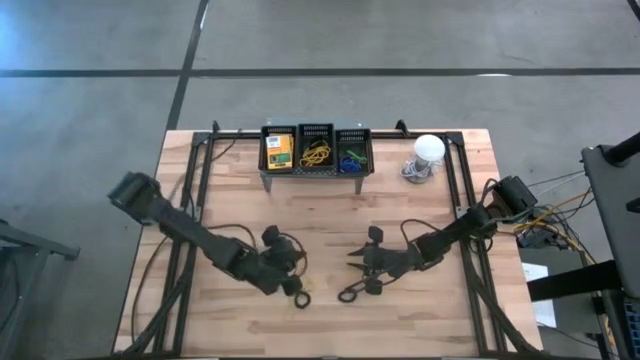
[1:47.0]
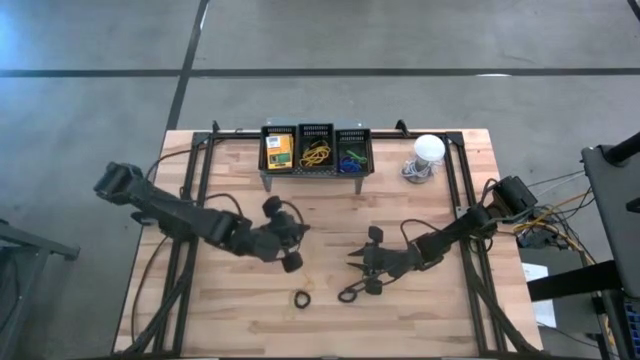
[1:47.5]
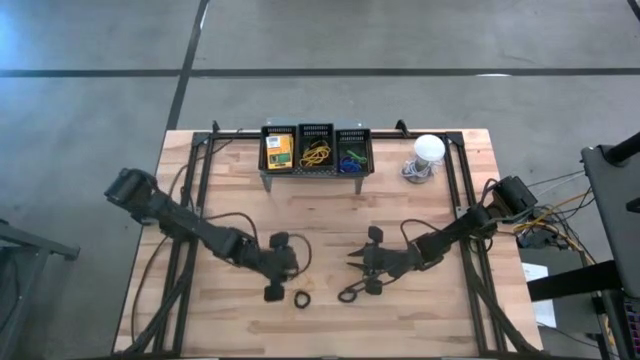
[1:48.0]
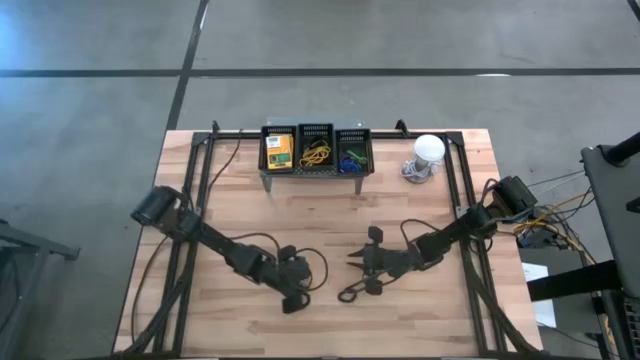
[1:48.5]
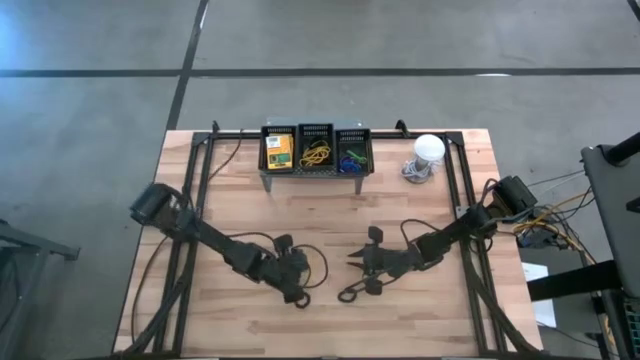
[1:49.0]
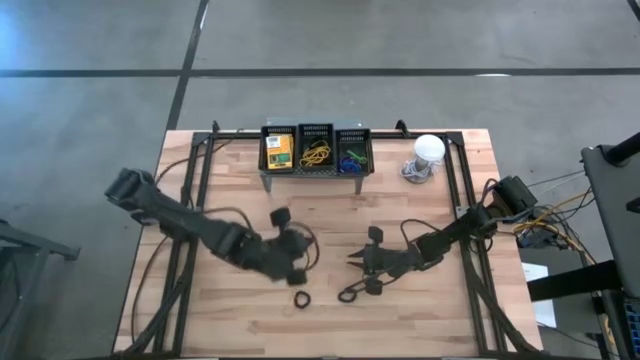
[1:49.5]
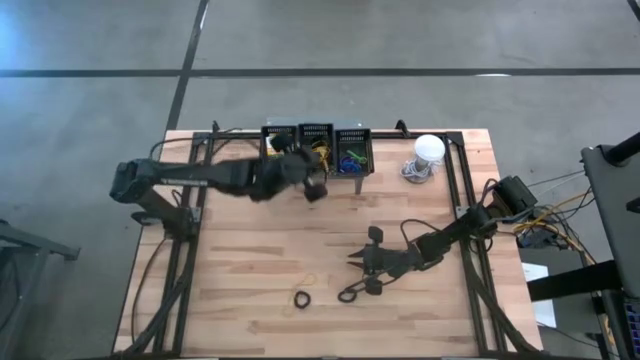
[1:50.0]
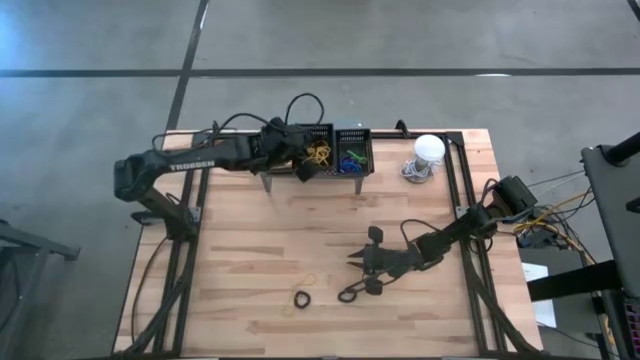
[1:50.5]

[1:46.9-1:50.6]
Task: Pick & Place Office Desk Supplies
Put the yellow rubber band into the middle black basket

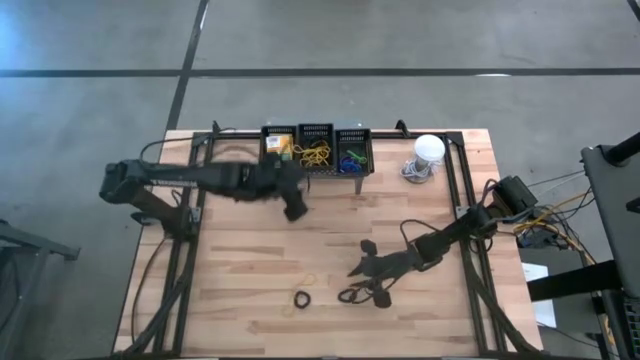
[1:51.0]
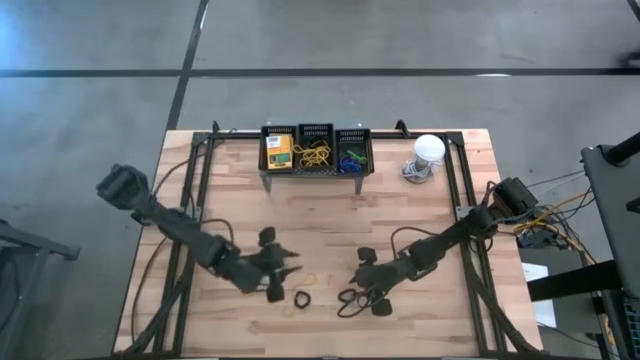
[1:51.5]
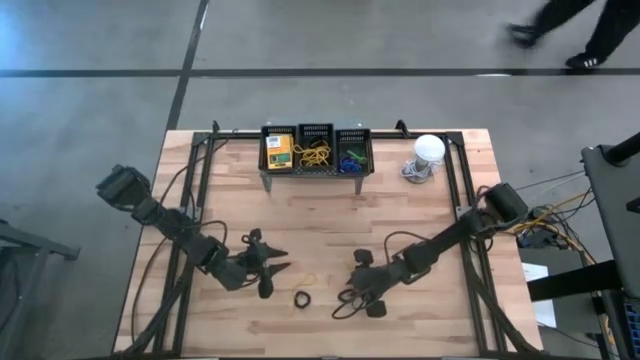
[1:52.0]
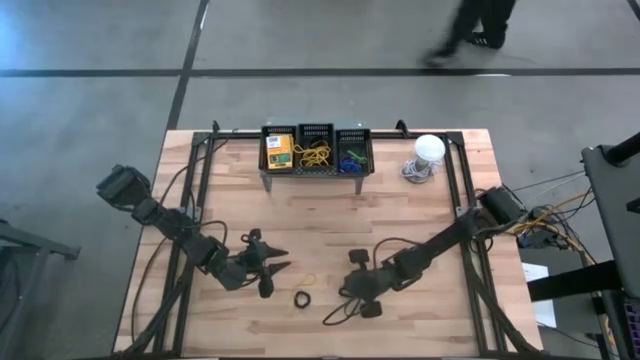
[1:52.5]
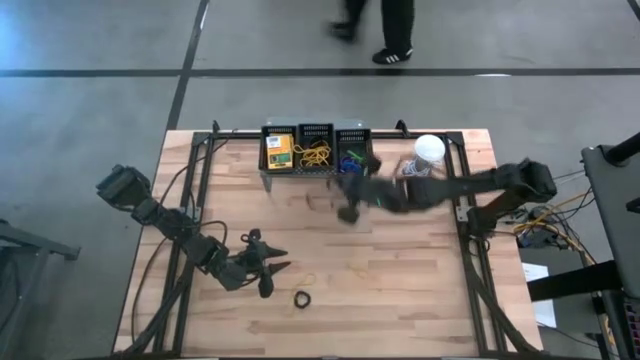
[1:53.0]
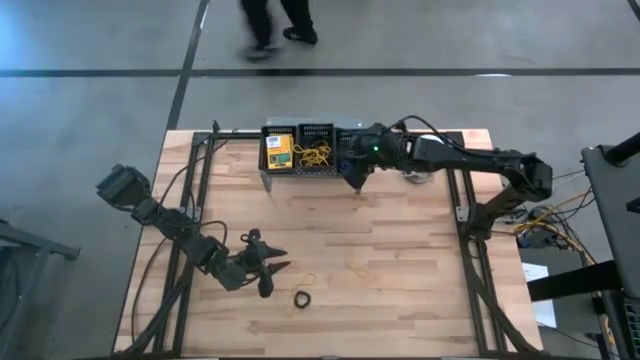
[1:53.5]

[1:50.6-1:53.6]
Put the black spring keychain into the right black basket

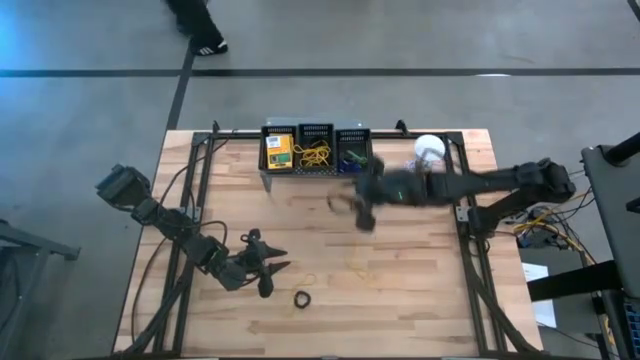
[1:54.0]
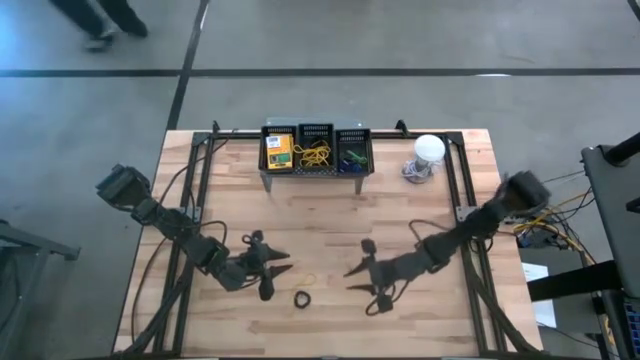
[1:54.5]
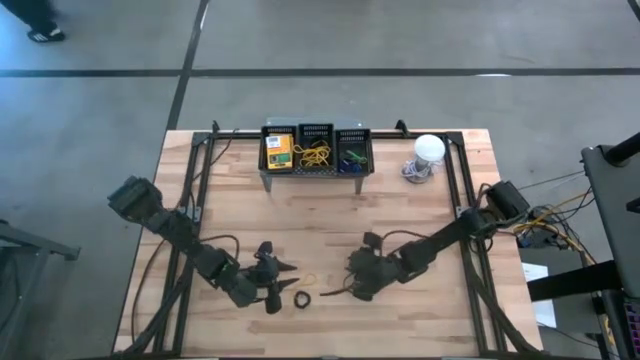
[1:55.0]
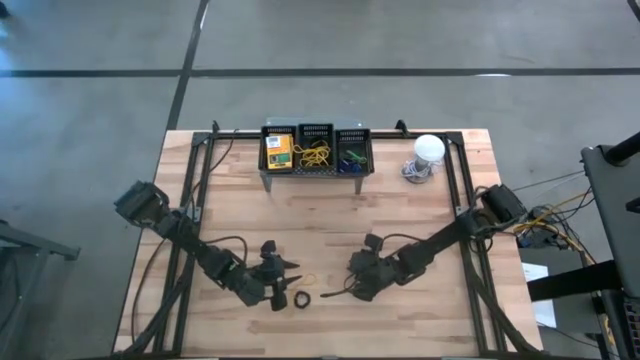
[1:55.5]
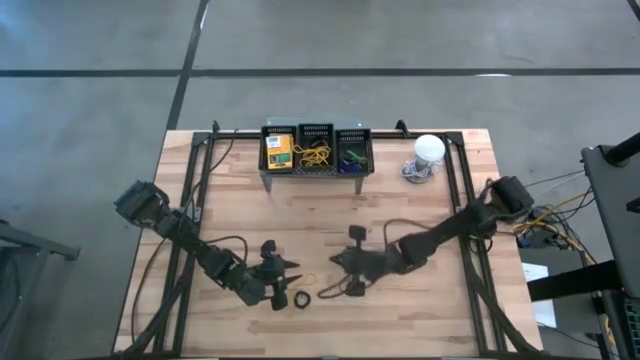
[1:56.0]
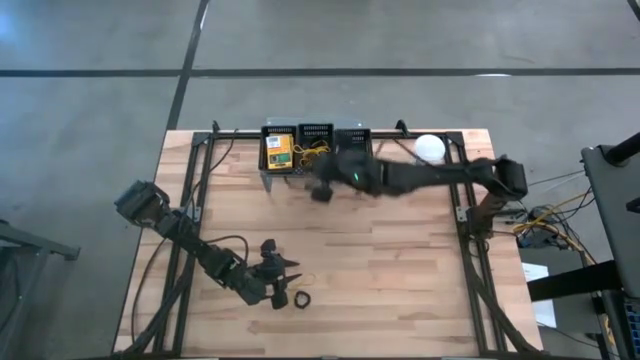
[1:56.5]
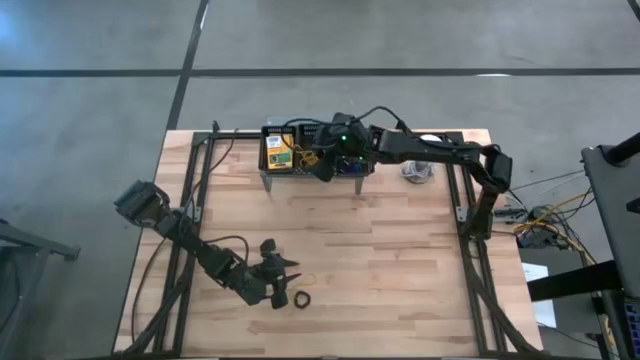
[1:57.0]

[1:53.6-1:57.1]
Put the yellow rubber band into the middle black basket

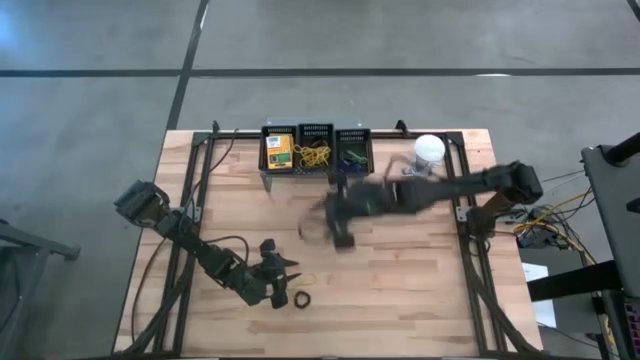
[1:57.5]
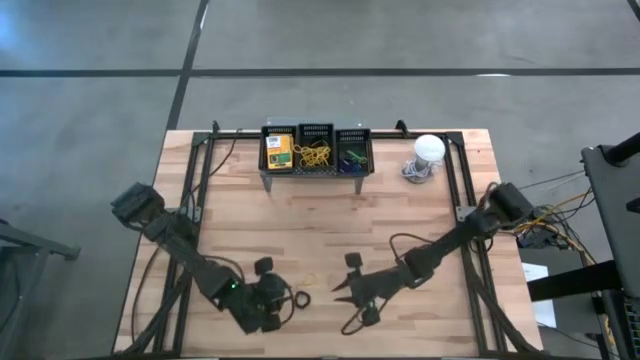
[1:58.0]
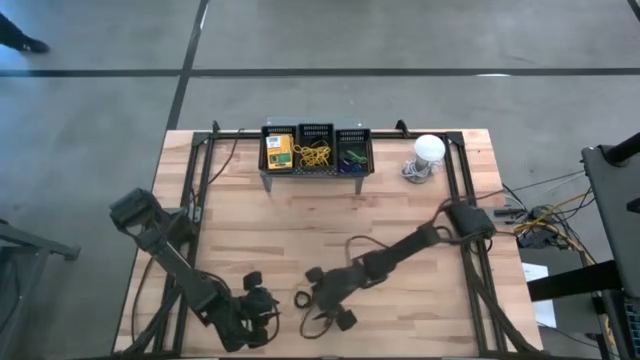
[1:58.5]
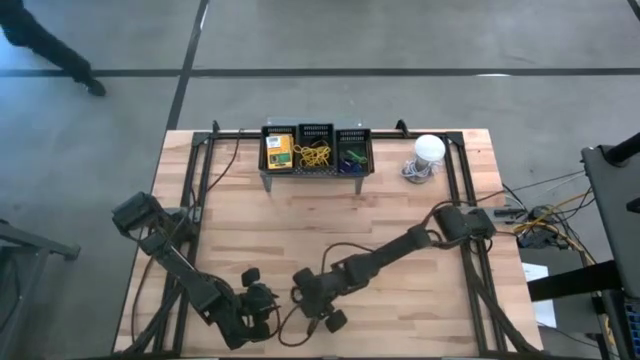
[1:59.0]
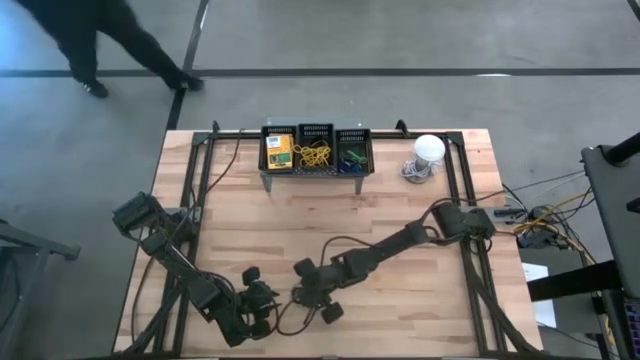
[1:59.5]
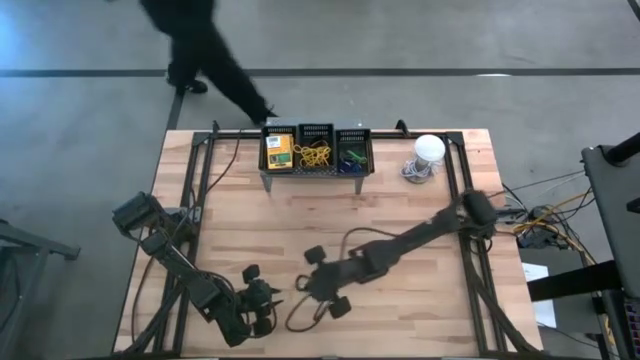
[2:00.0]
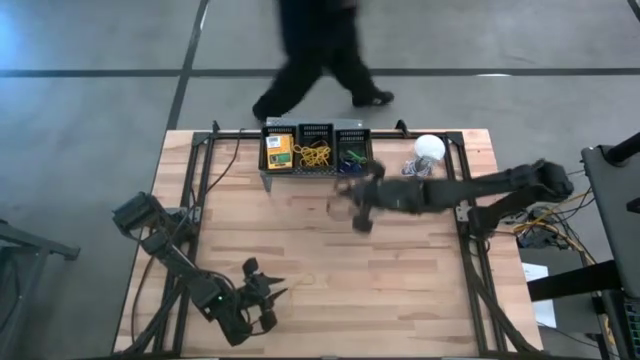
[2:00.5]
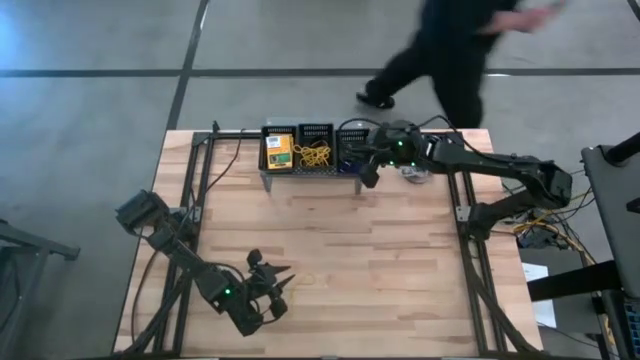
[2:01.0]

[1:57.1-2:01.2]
Put the black spring keychain into the right black basket

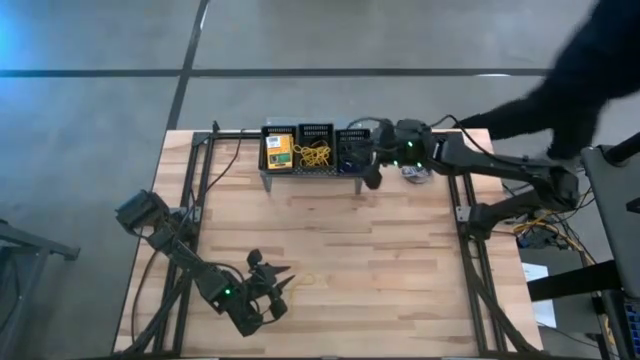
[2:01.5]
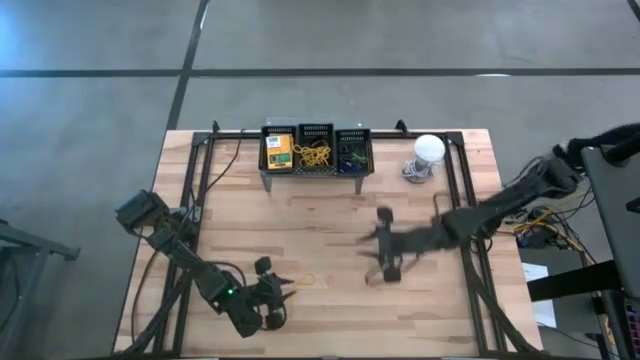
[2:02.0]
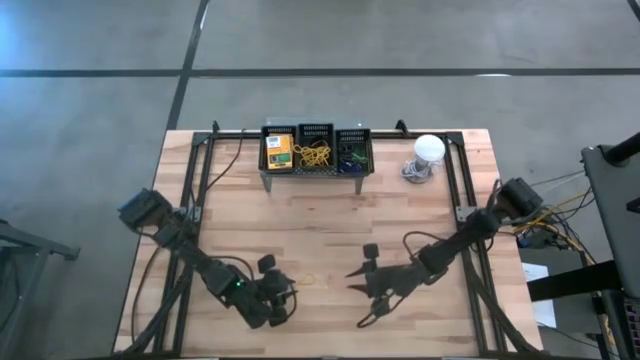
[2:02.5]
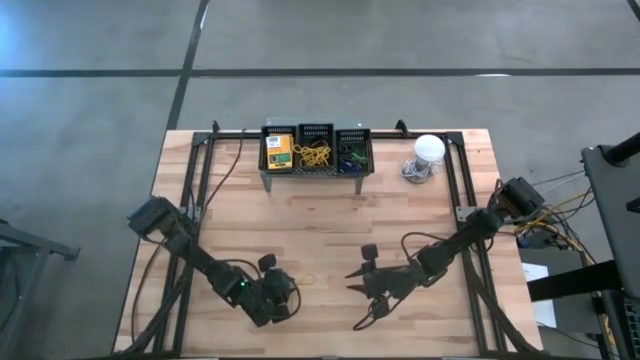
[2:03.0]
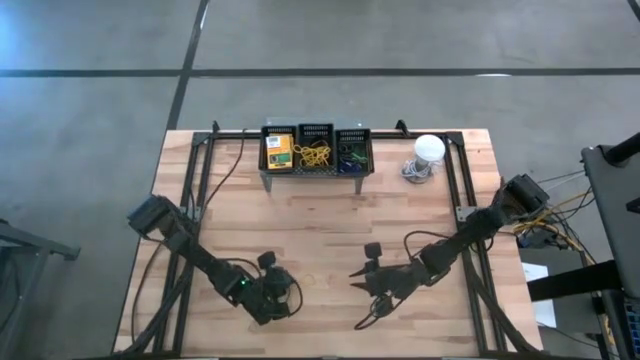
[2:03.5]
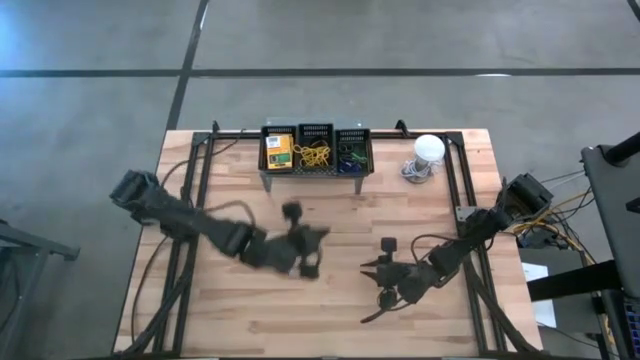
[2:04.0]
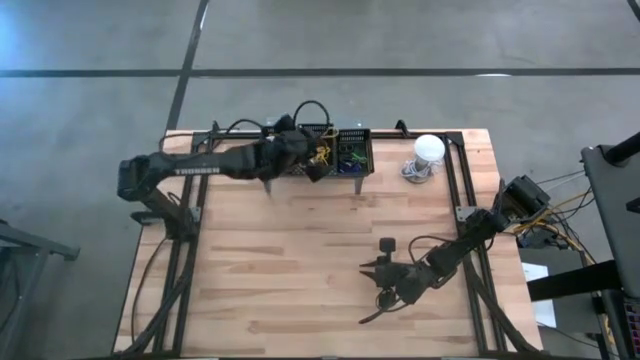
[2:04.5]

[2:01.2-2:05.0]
Put the yellow rubber band into the middle black basket

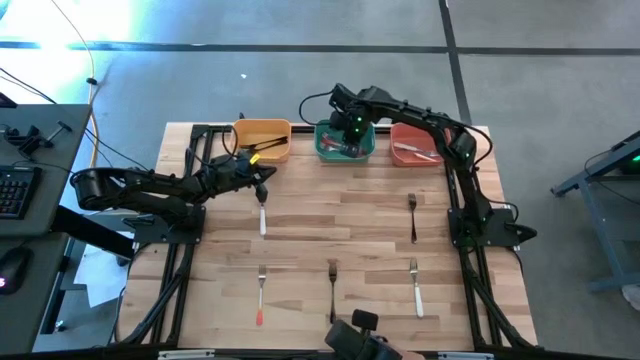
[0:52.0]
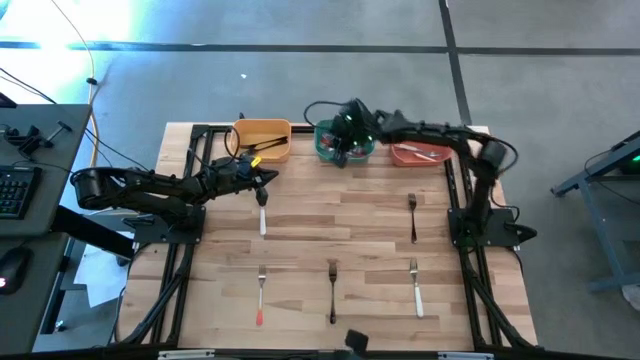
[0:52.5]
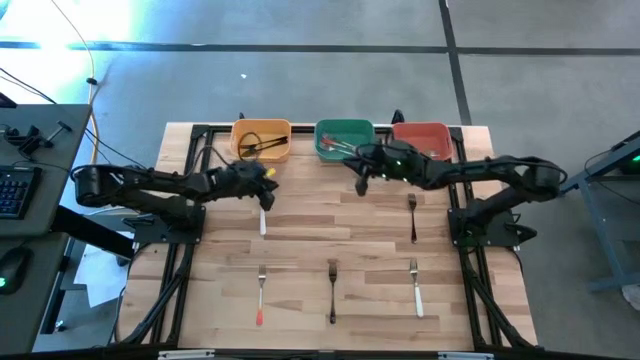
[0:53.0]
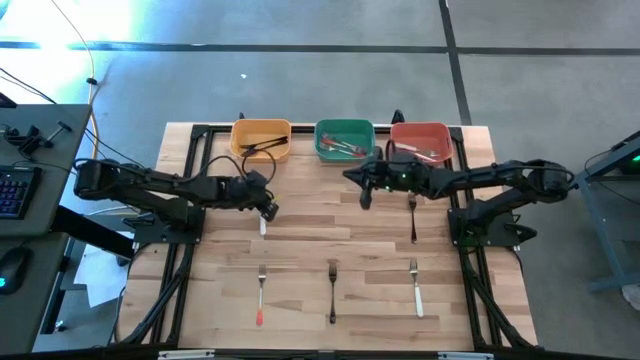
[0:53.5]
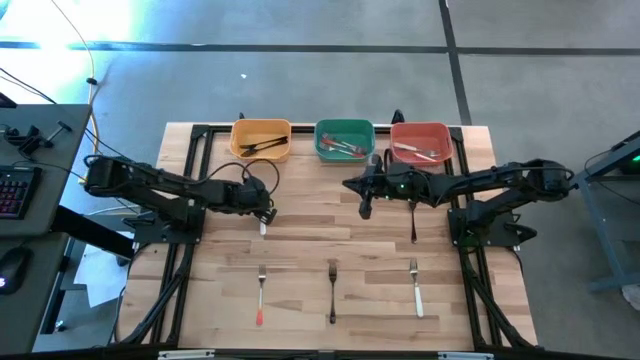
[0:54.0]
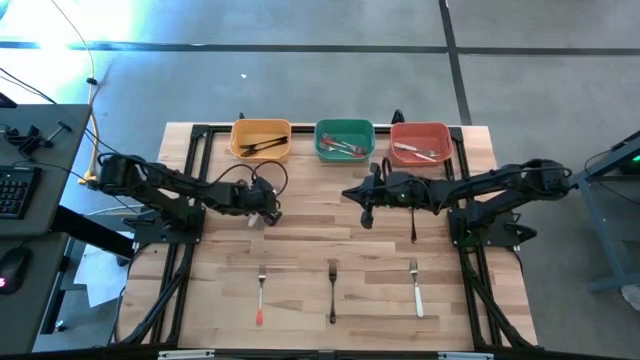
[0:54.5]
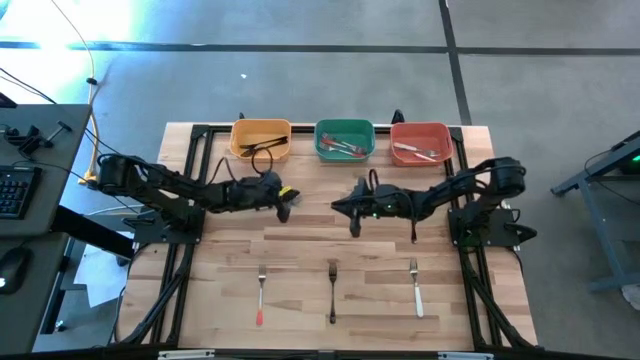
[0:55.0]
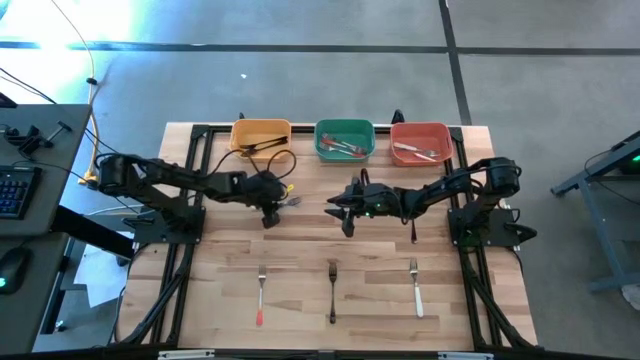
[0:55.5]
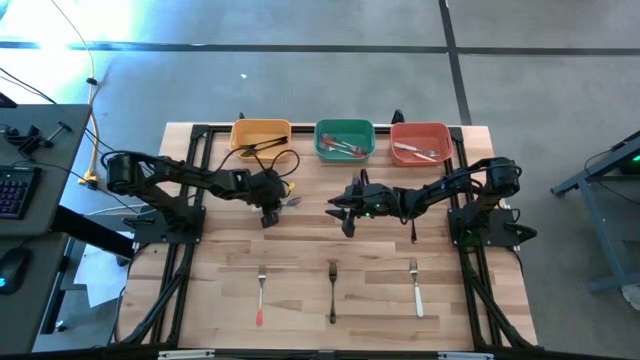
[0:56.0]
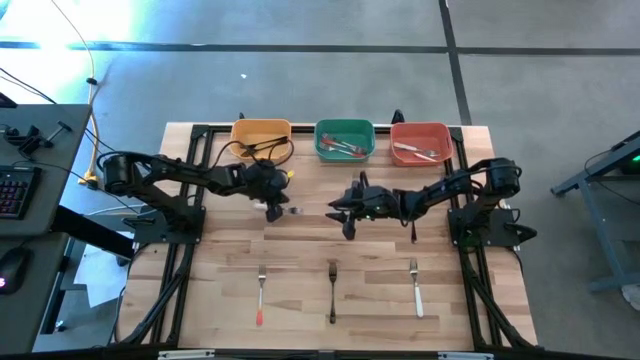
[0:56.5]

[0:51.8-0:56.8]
Task: Sort silverware by color (type)
Put the top white fork into the orange bin
